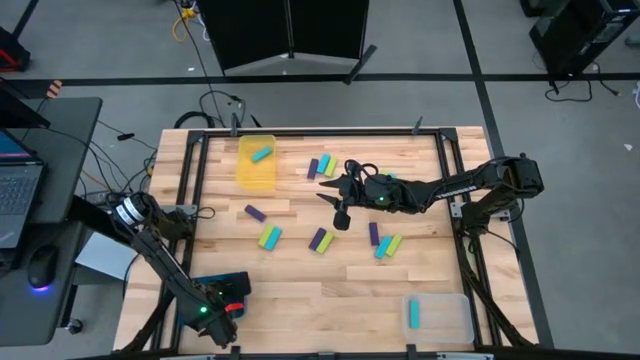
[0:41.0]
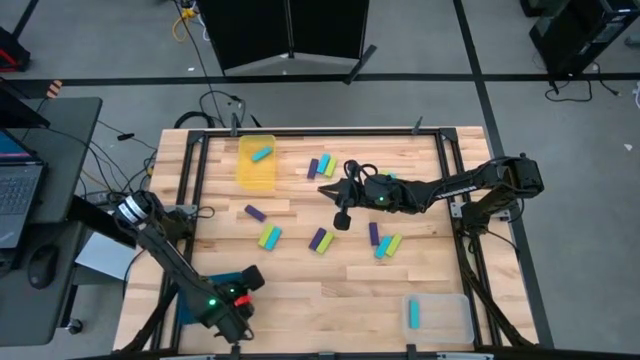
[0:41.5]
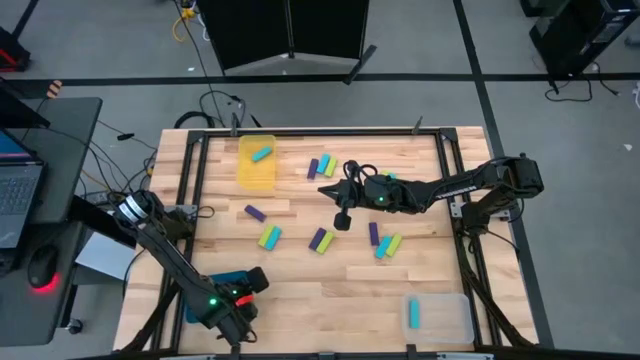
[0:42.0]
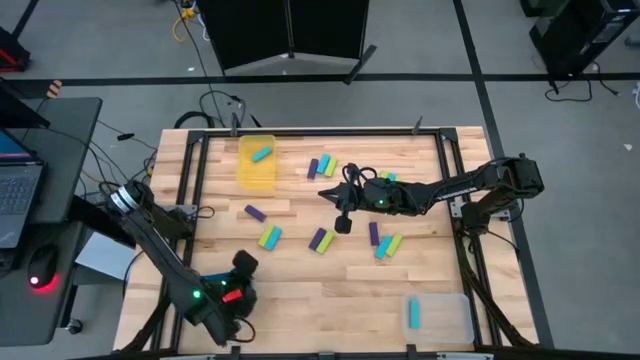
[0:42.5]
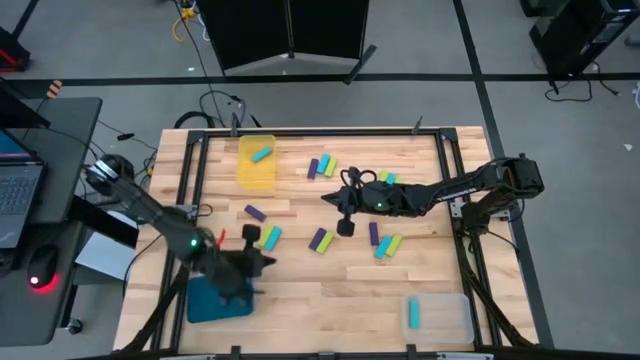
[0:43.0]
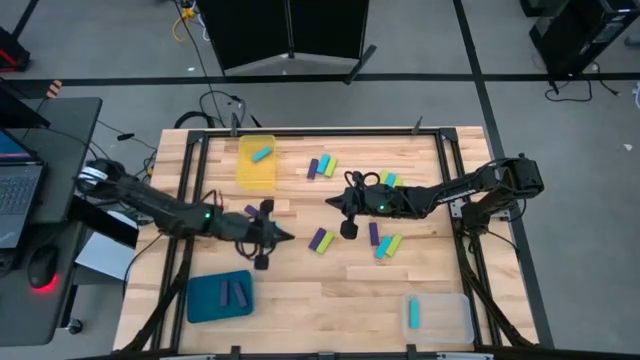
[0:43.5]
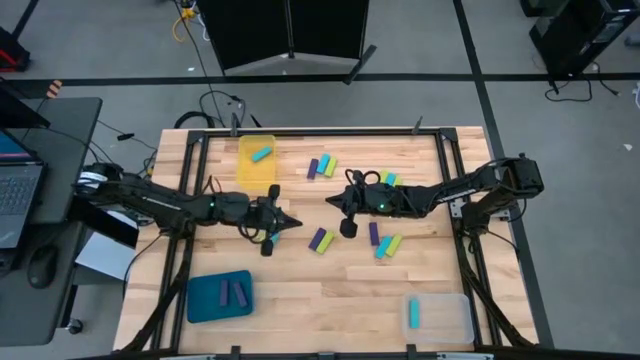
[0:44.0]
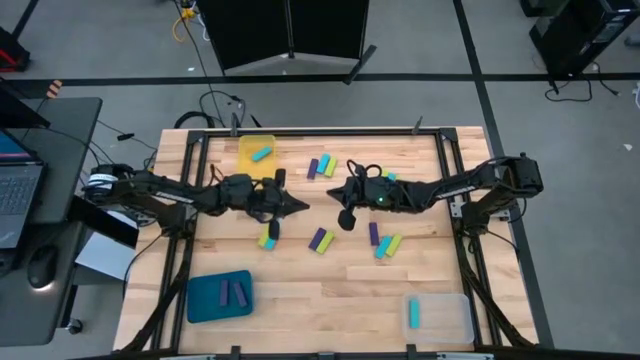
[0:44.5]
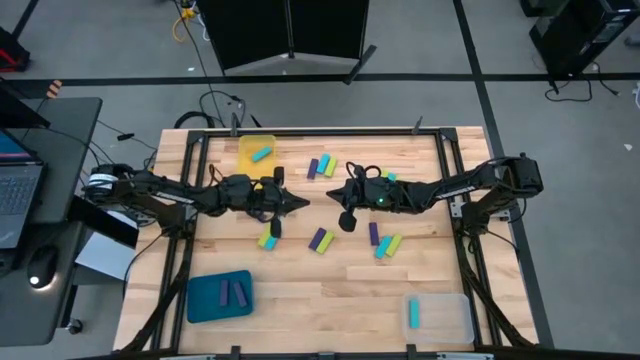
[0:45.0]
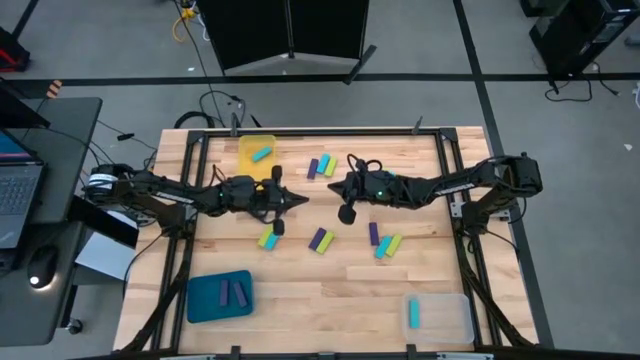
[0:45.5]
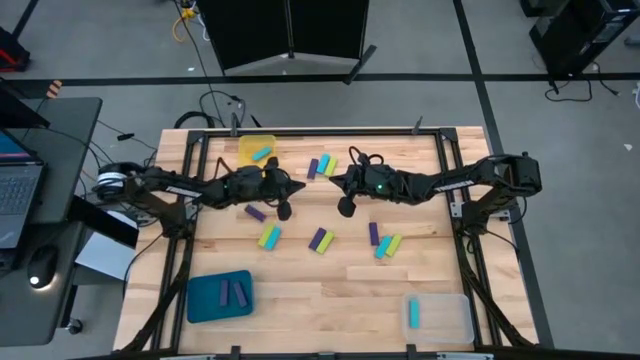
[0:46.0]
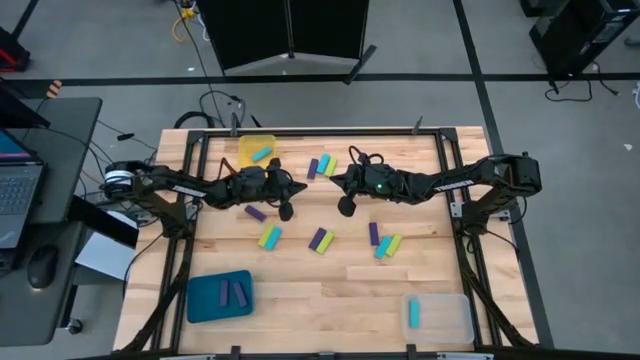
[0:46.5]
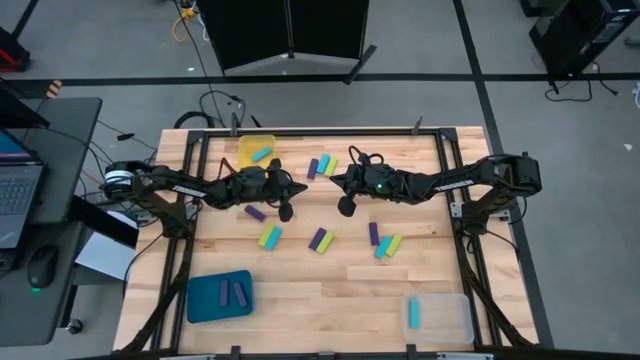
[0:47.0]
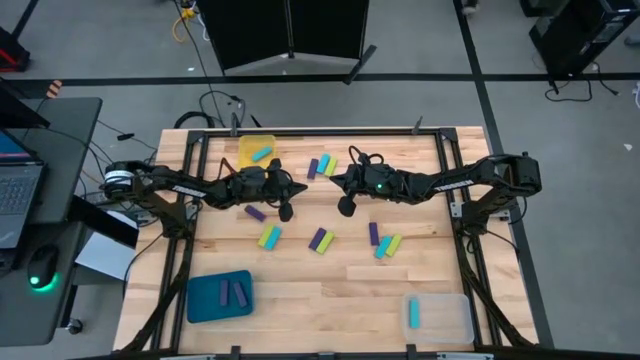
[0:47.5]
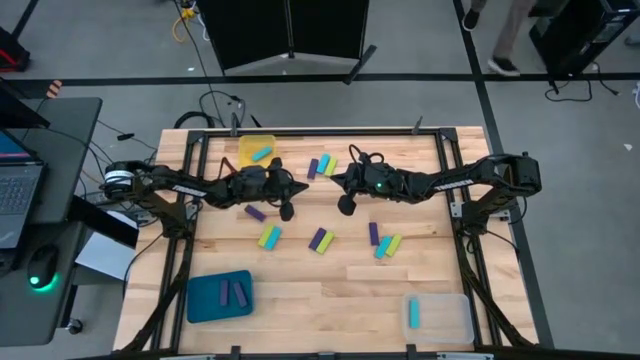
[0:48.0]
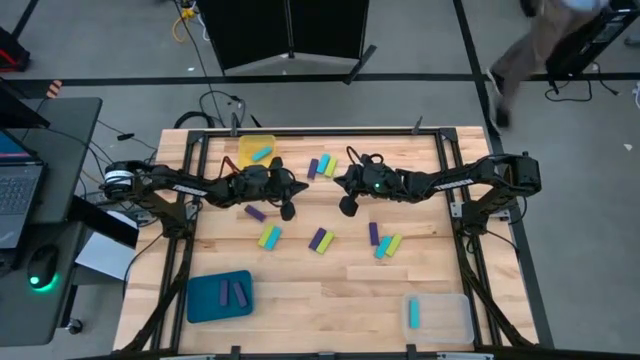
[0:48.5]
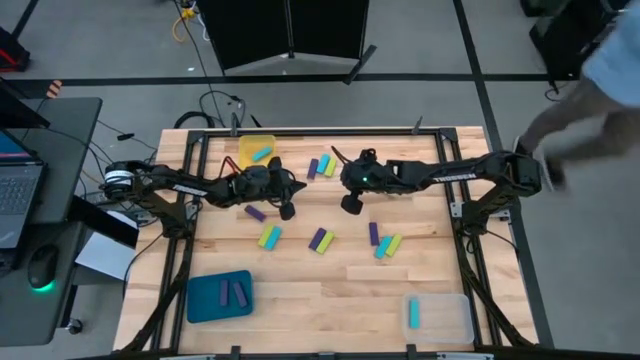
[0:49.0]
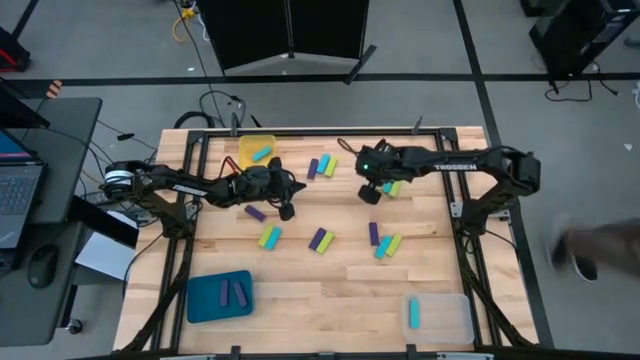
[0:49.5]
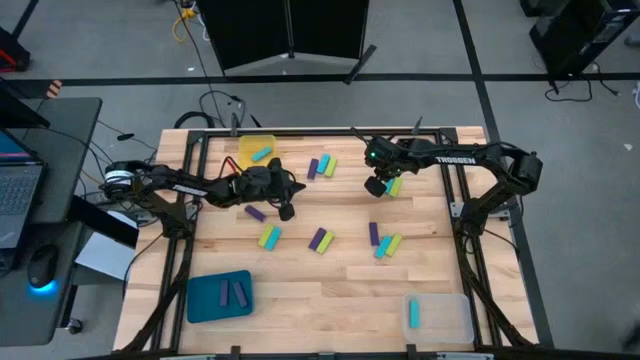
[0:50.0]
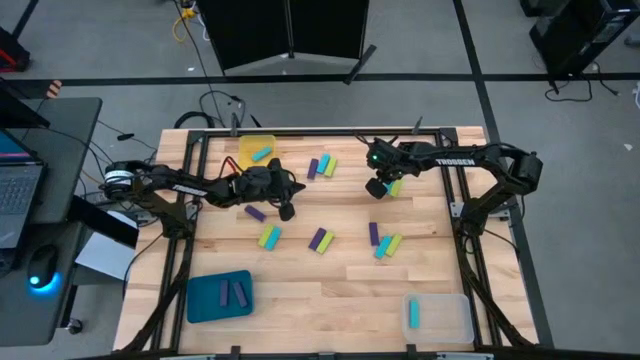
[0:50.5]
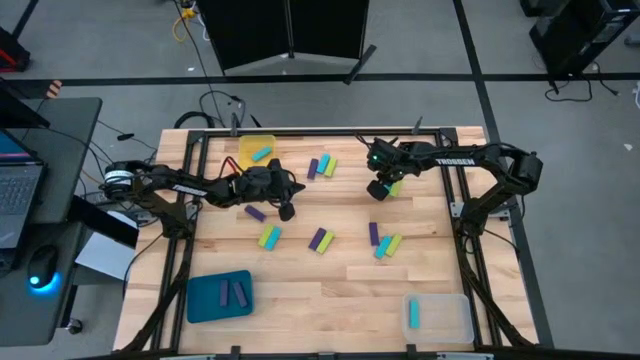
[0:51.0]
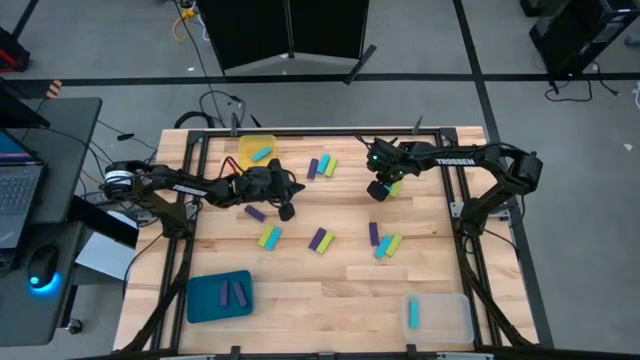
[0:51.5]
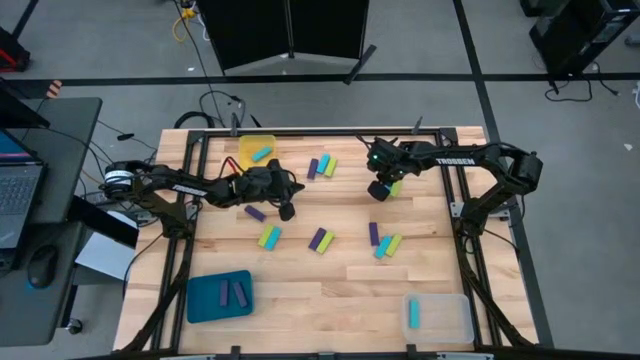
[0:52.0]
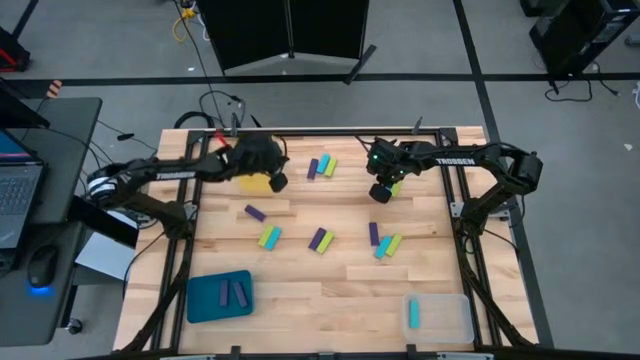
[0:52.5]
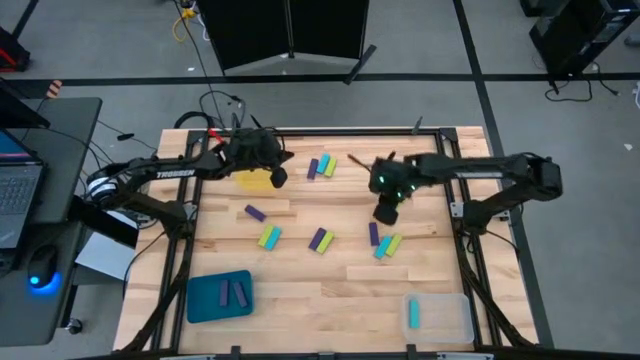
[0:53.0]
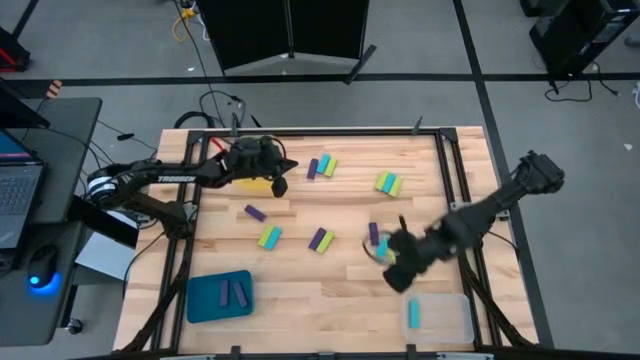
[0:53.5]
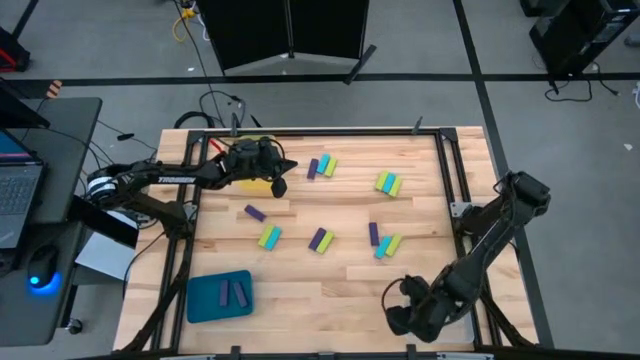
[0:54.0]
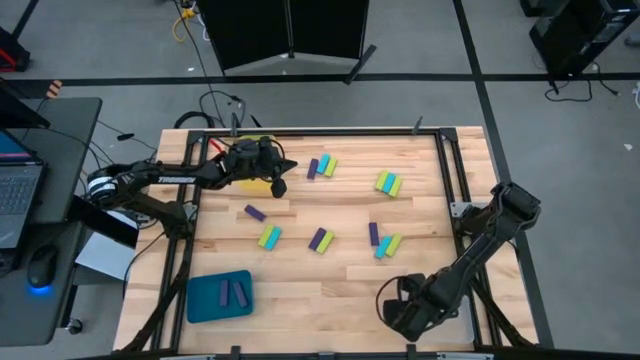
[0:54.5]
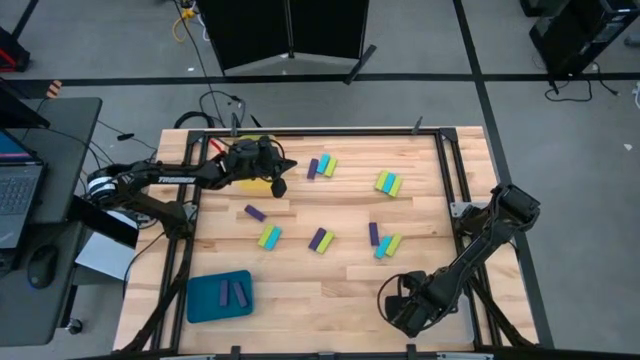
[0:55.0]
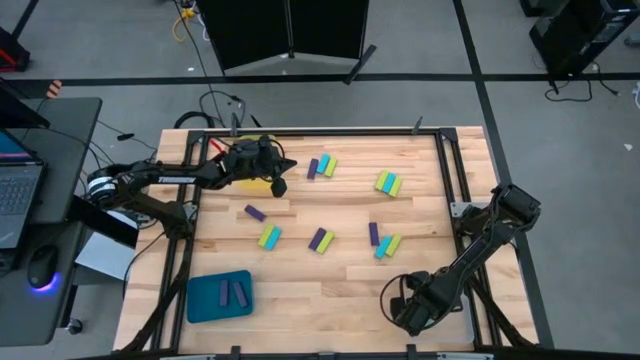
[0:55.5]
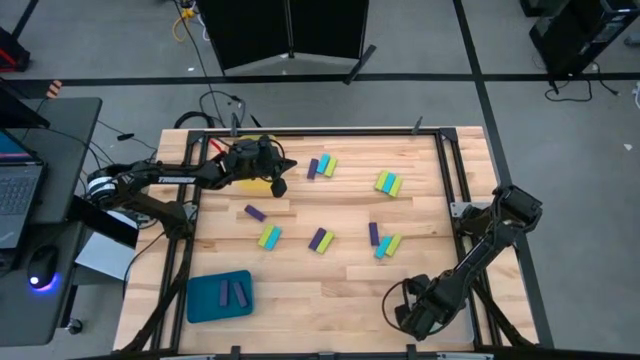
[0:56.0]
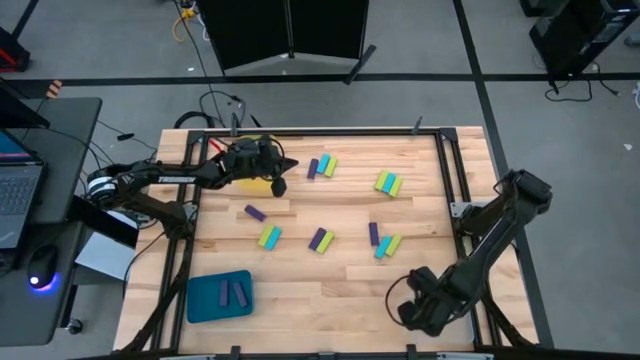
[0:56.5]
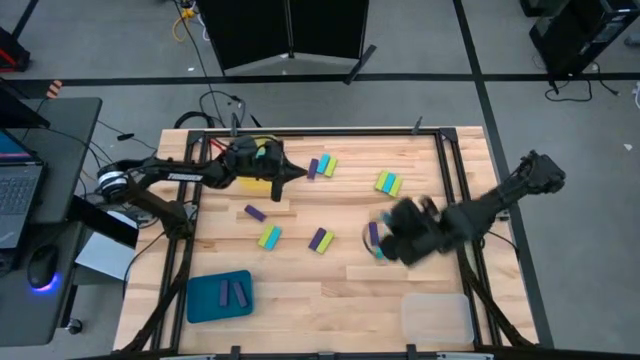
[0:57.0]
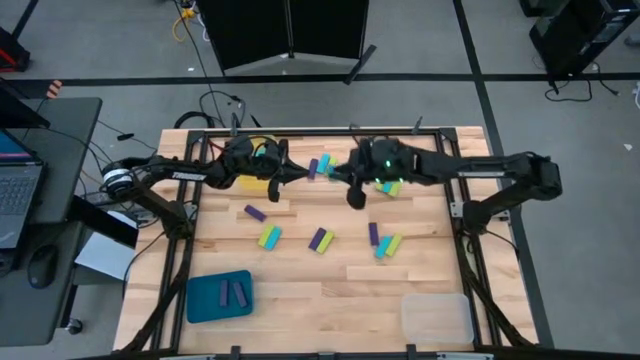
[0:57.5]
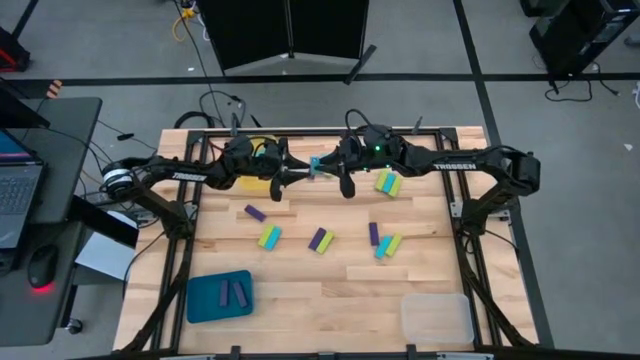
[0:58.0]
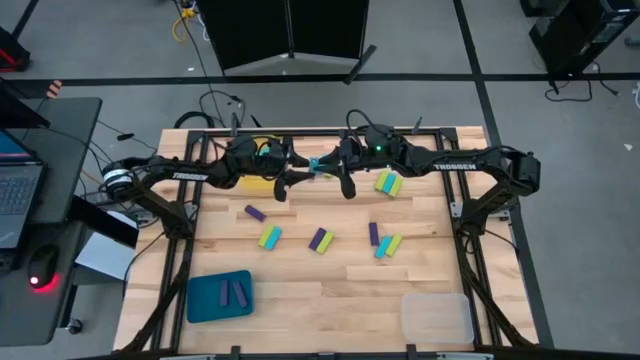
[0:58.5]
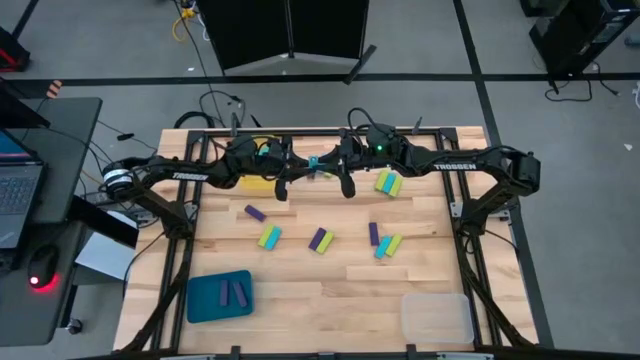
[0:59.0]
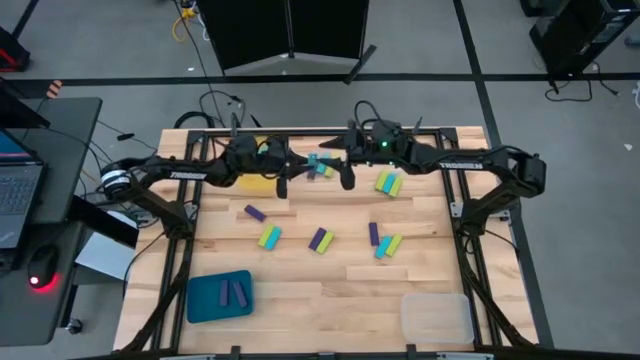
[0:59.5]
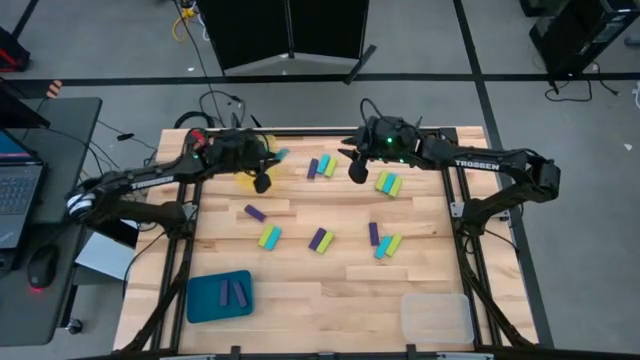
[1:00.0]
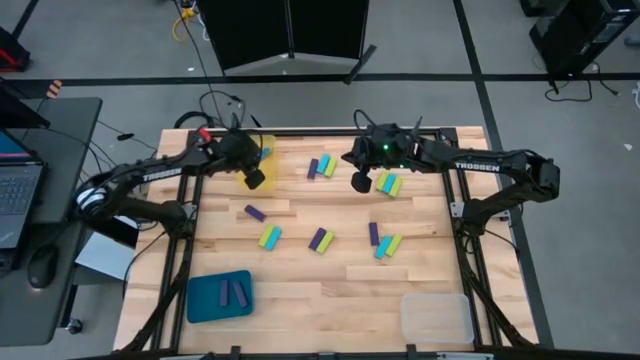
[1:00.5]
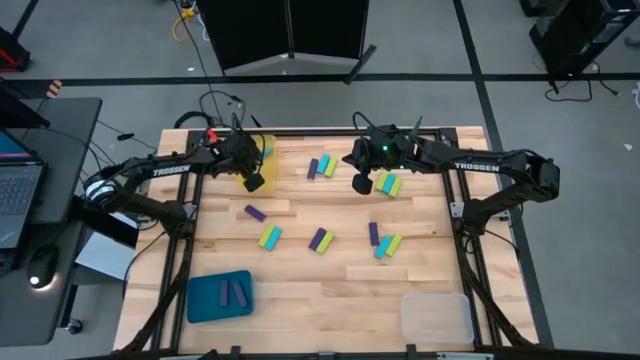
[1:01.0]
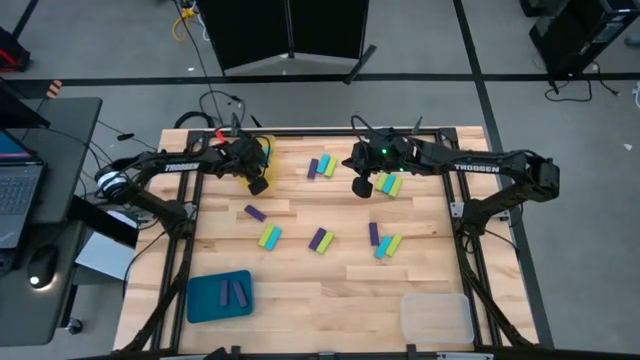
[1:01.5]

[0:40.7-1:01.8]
Task: Sort blocks
Put the blue block into the yellow bin
